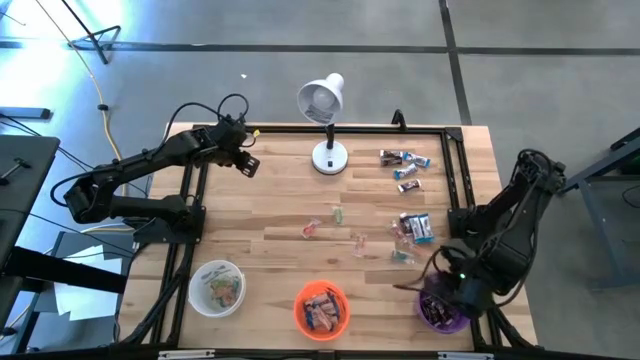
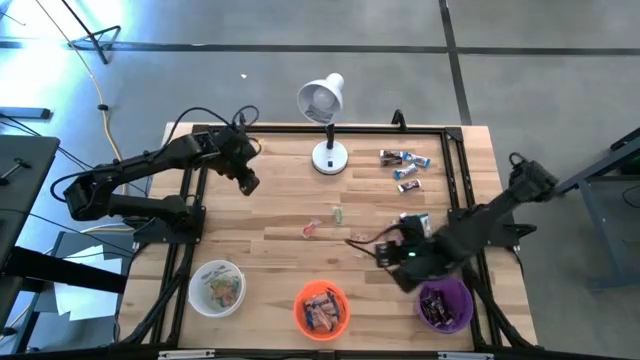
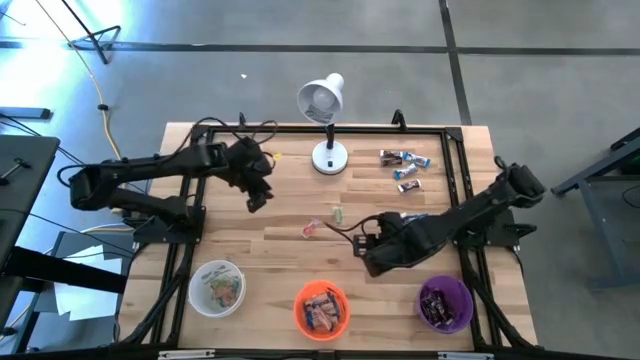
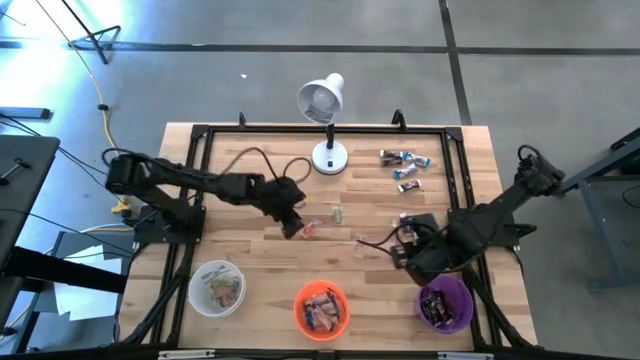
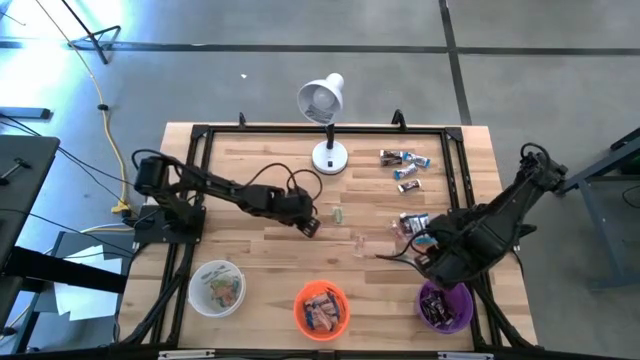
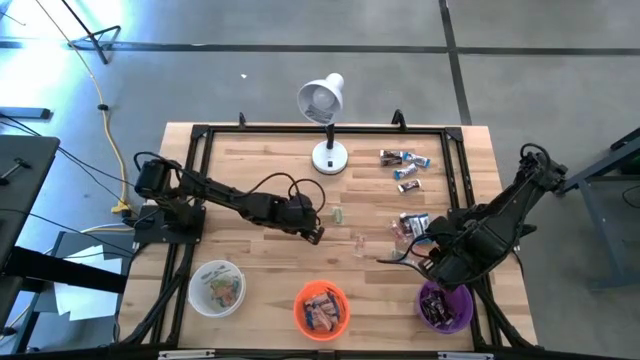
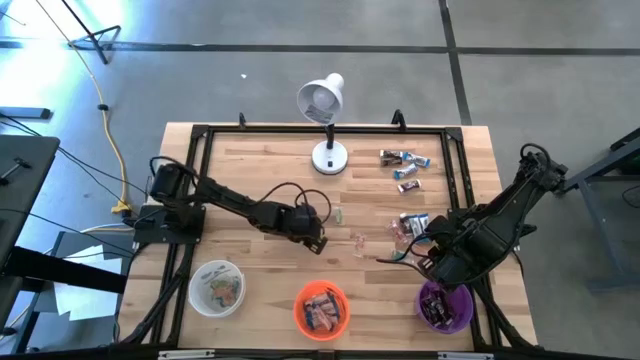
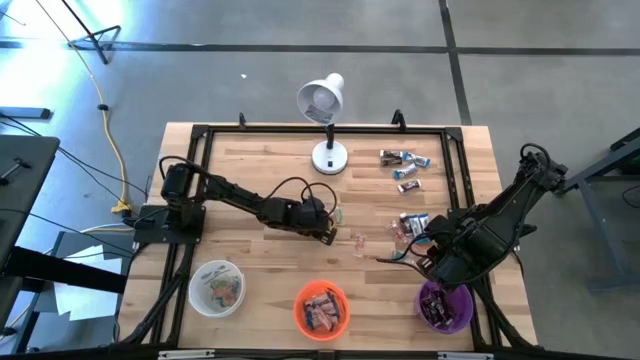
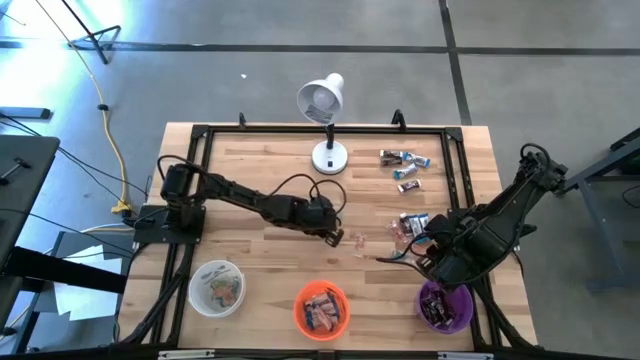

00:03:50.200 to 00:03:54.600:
Task: Organize candy in baskets
Put the red gummy into the white bucket

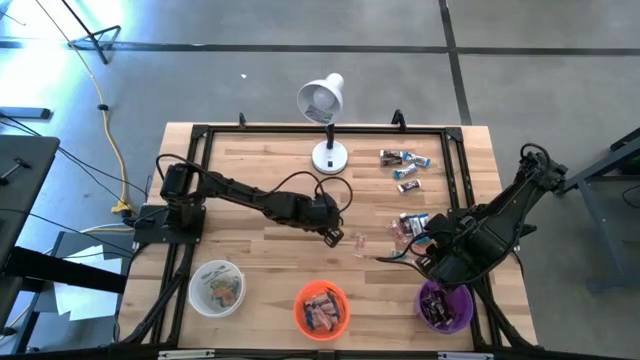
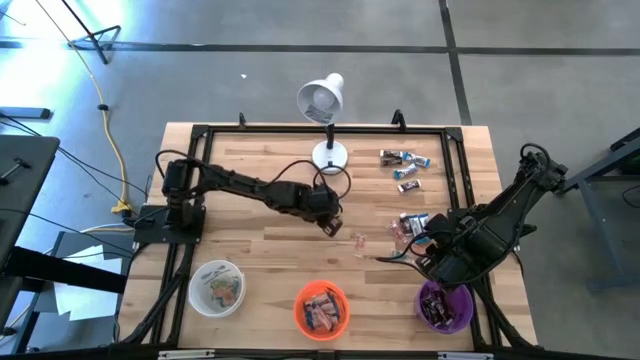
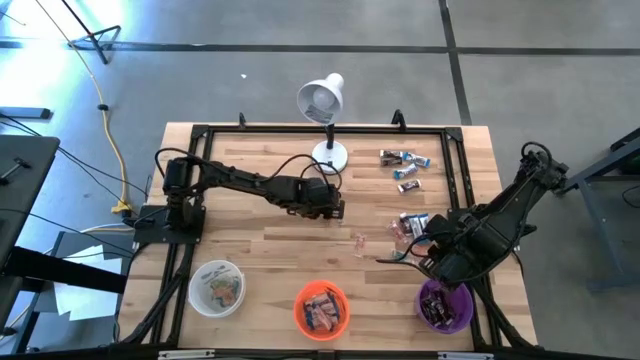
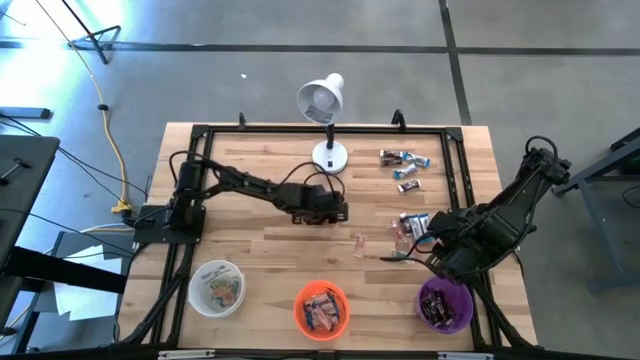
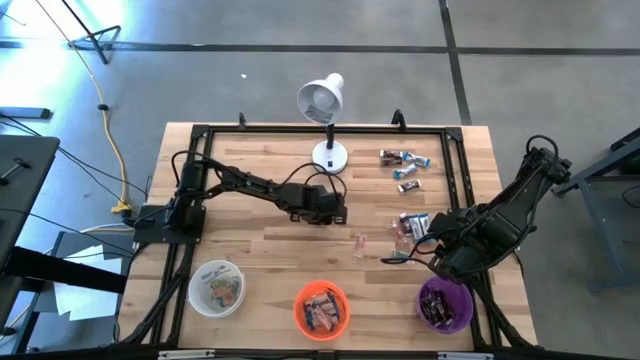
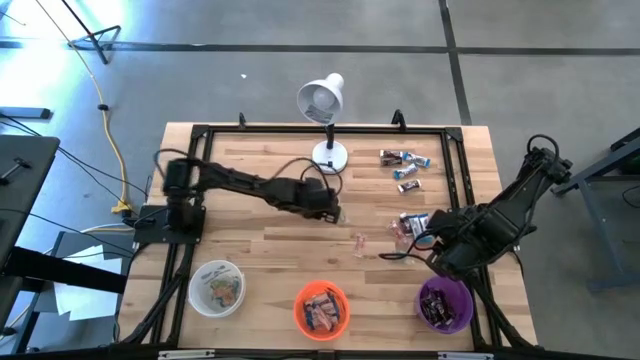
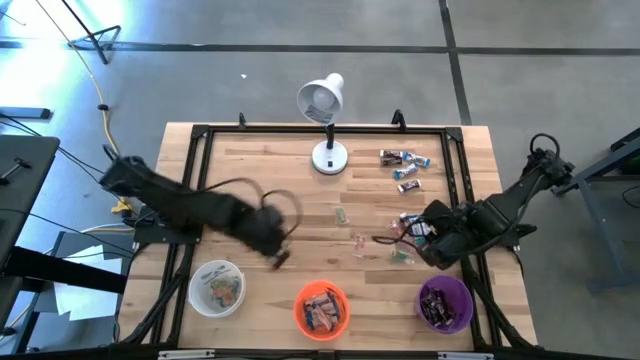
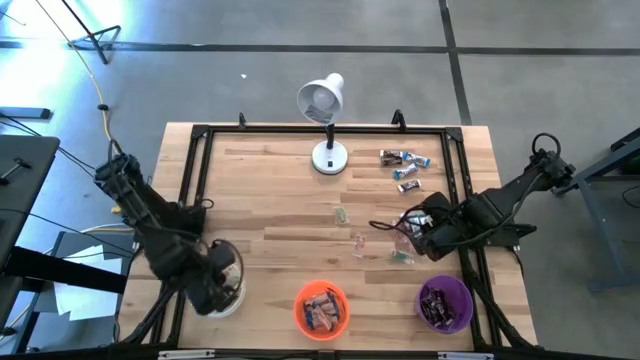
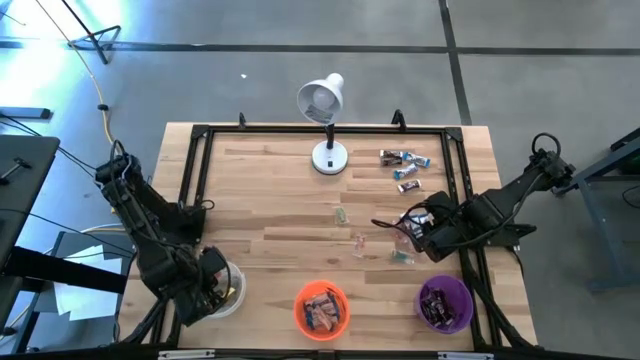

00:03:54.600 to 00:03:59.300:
Put the red gummy into the white bucket

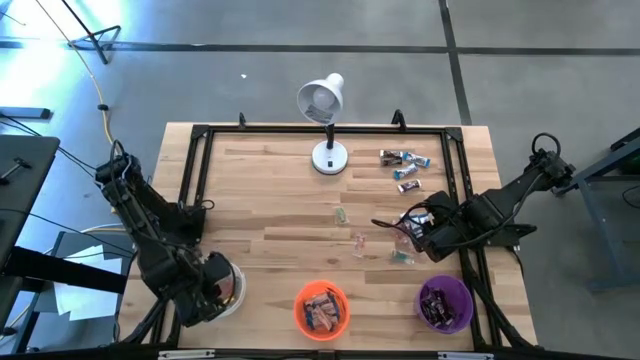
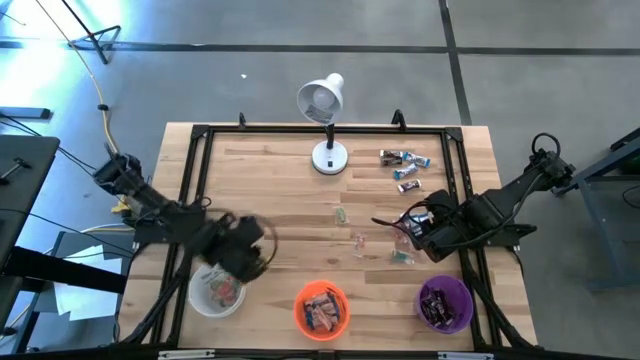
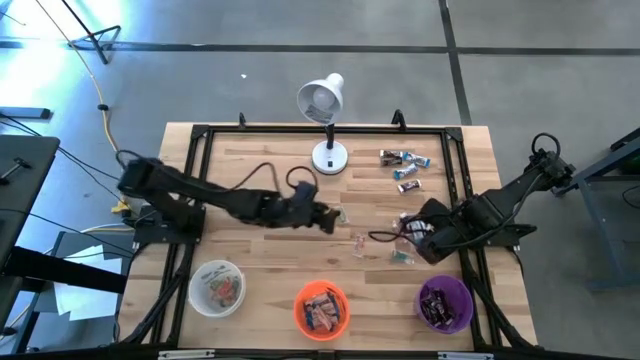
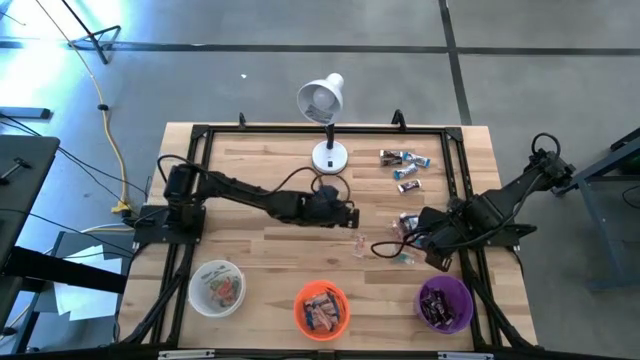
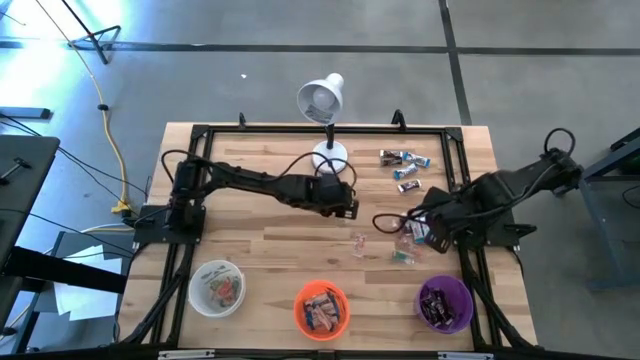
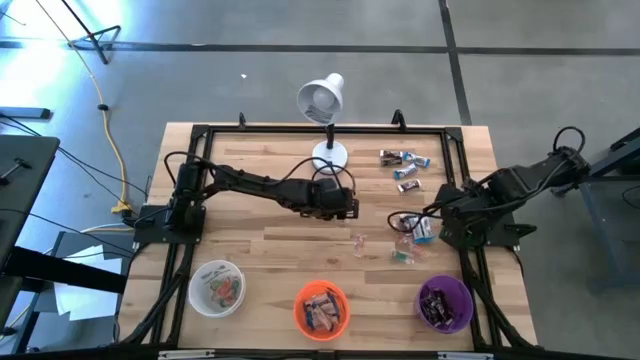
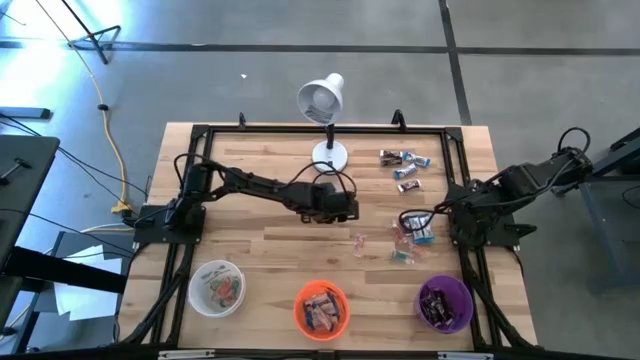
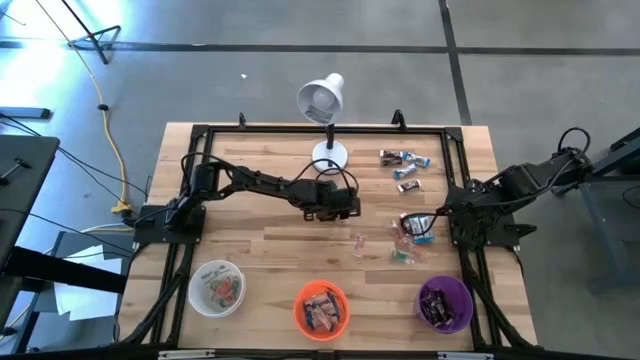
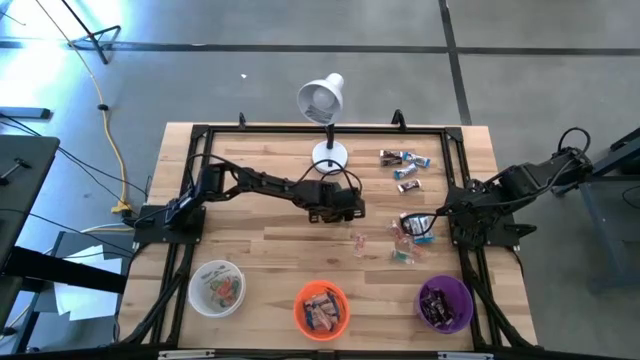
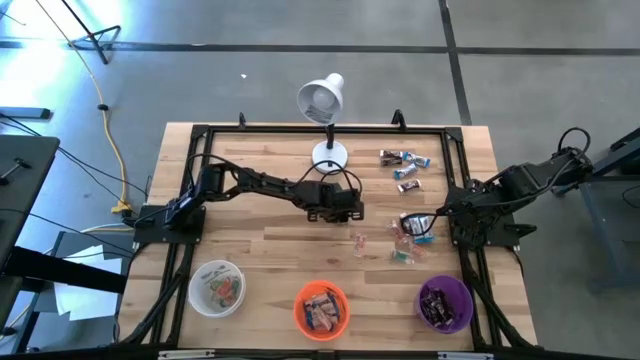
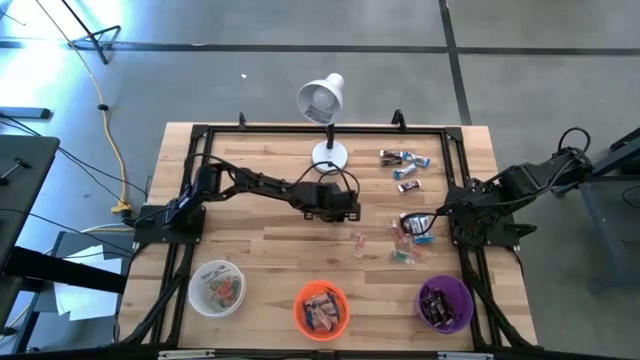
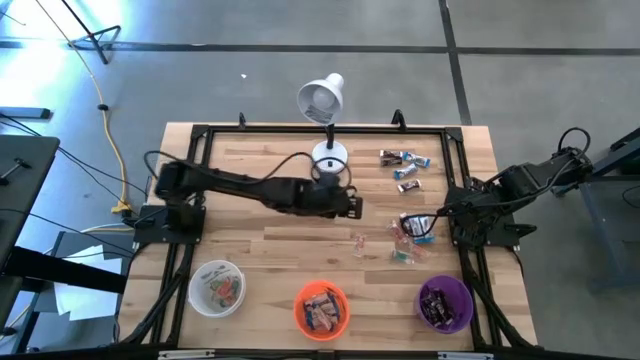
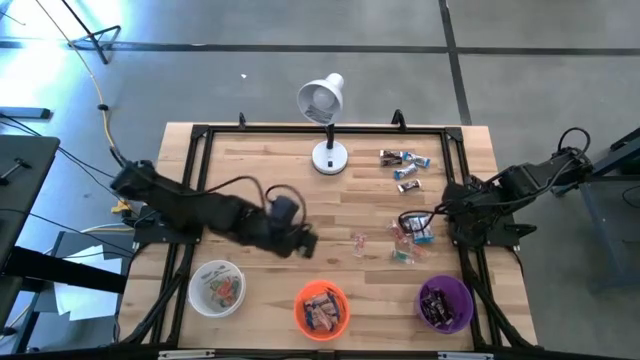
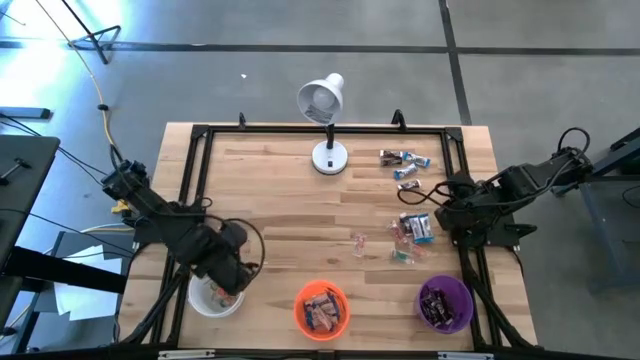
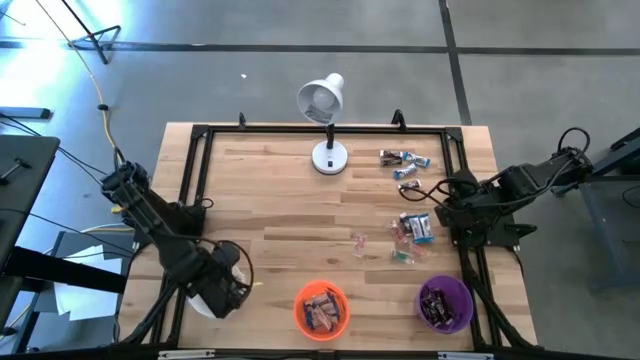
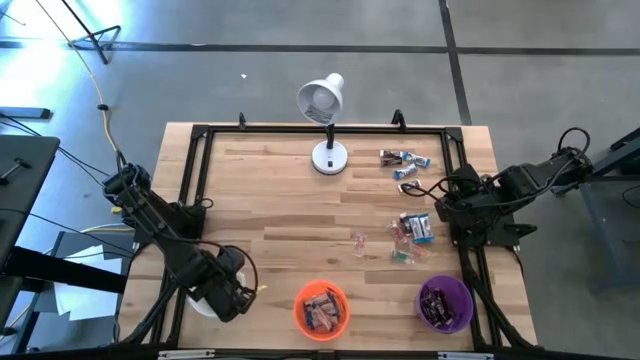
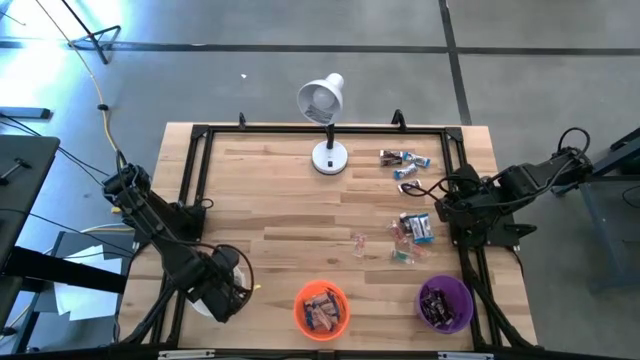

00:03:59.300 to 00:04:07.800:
Put the light green gummy into the white bucket

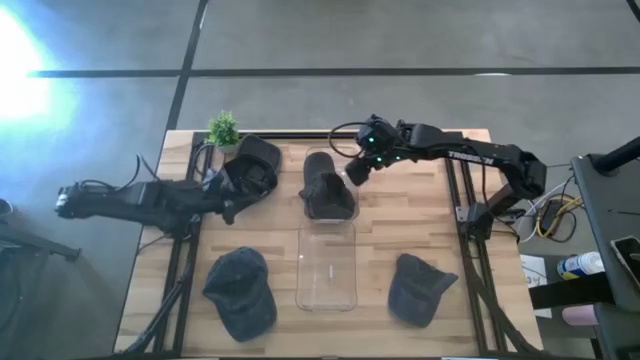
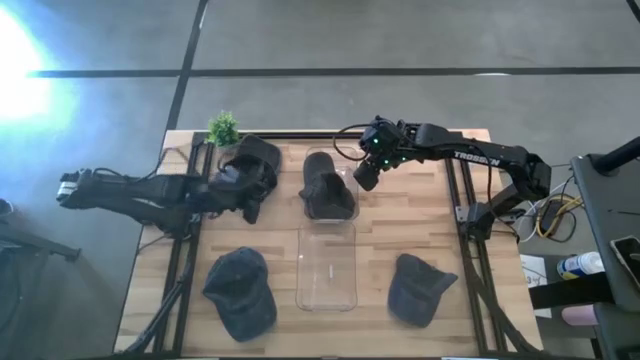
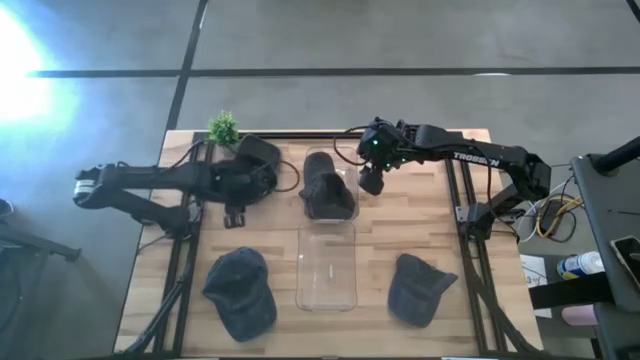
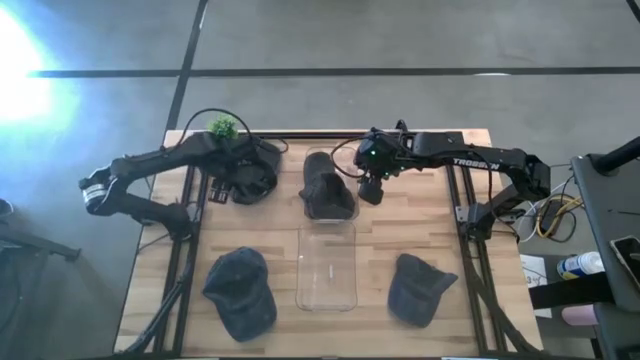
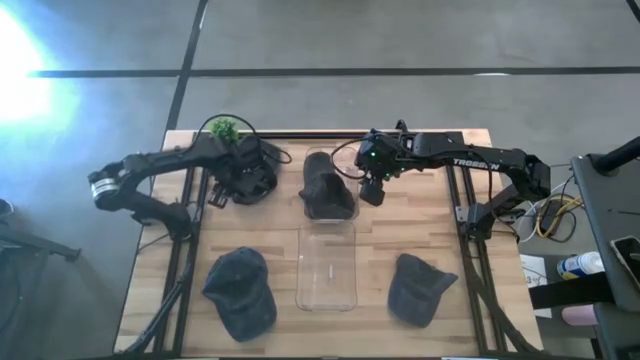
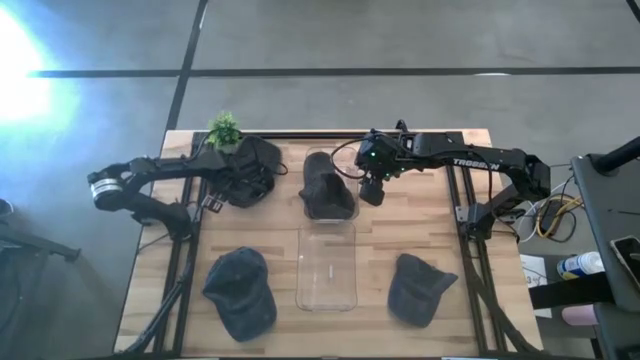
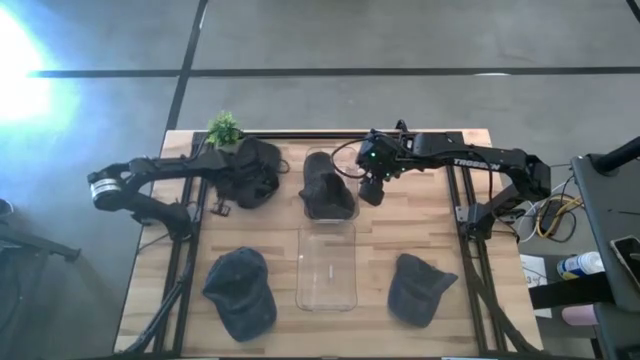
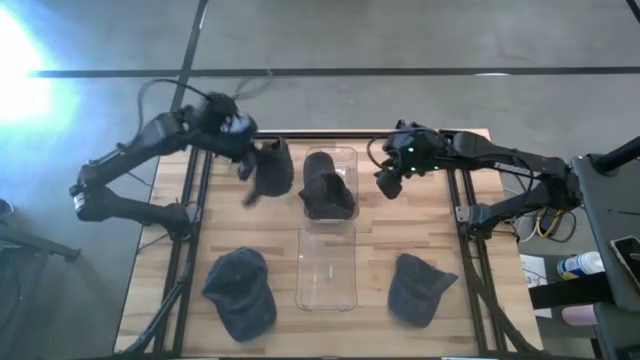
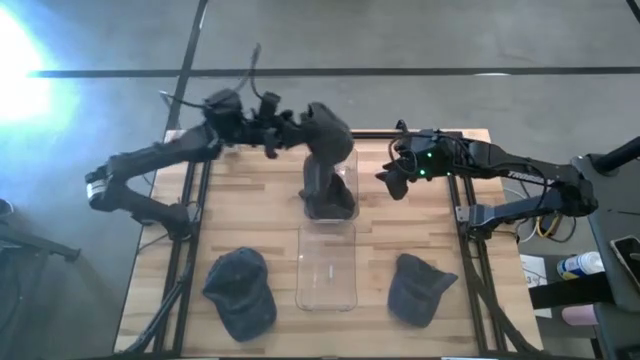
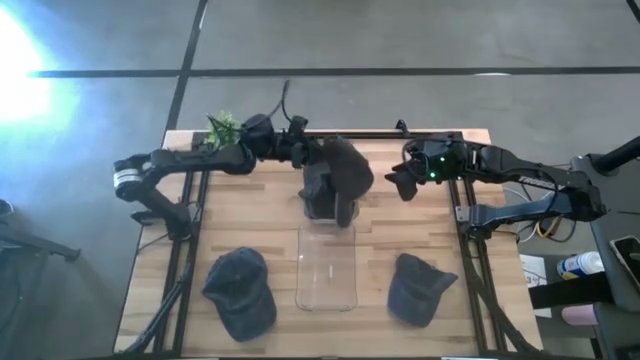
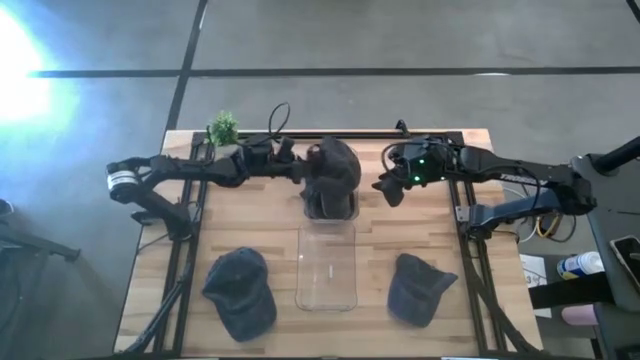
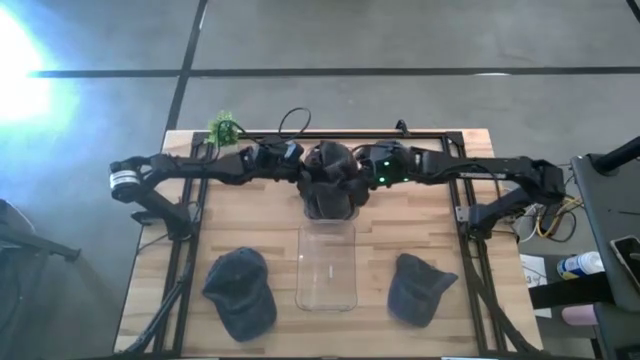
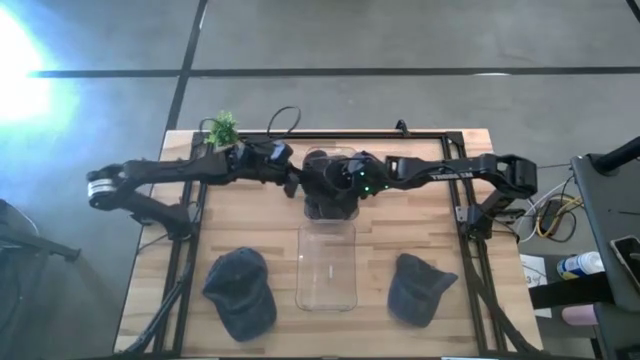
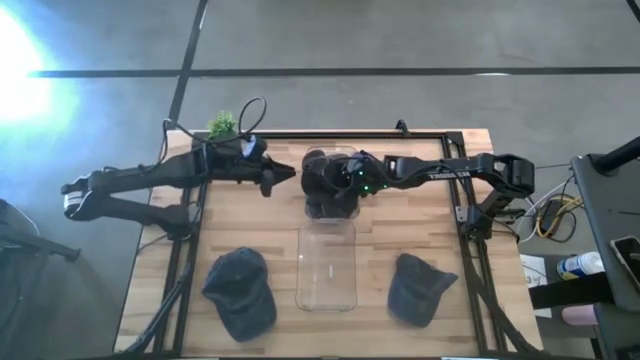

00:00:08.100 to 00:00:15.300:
Task: Pick & Place hat
Put the gray cap into the top transparent bin
